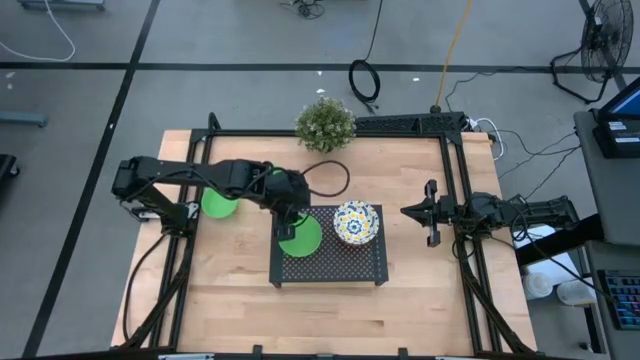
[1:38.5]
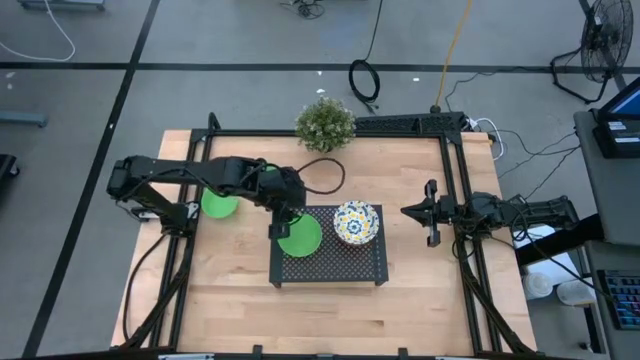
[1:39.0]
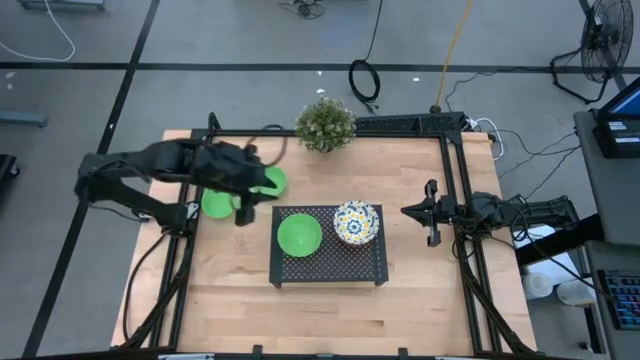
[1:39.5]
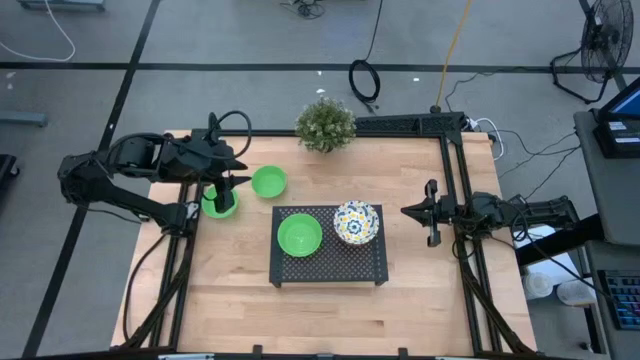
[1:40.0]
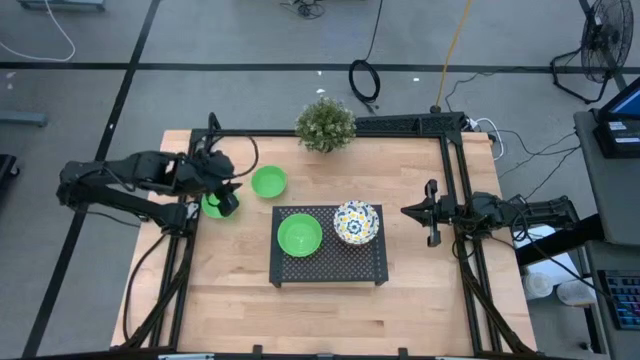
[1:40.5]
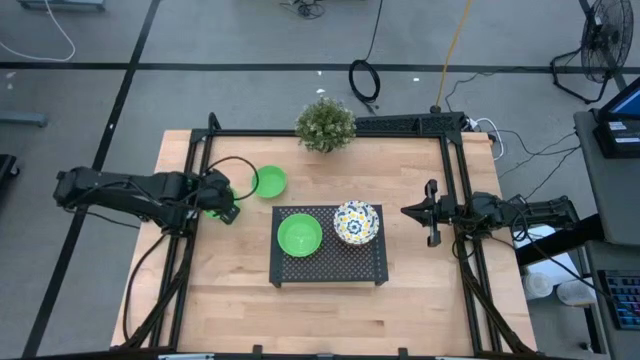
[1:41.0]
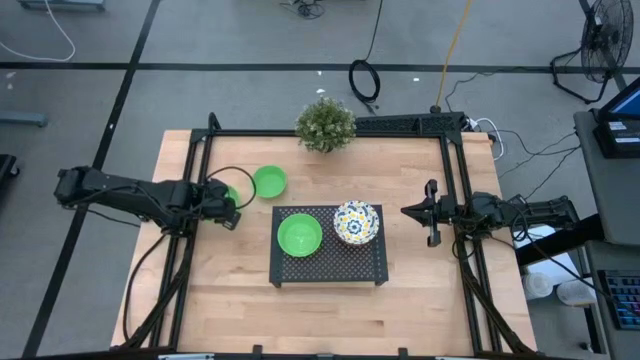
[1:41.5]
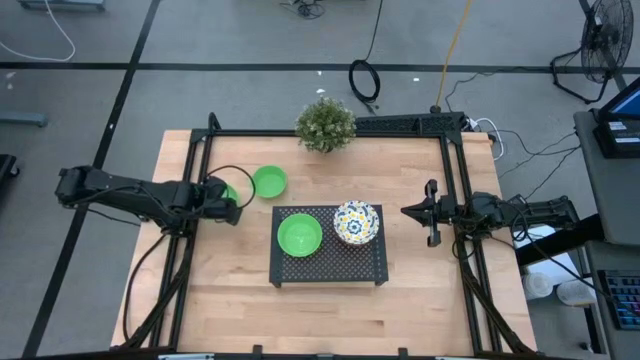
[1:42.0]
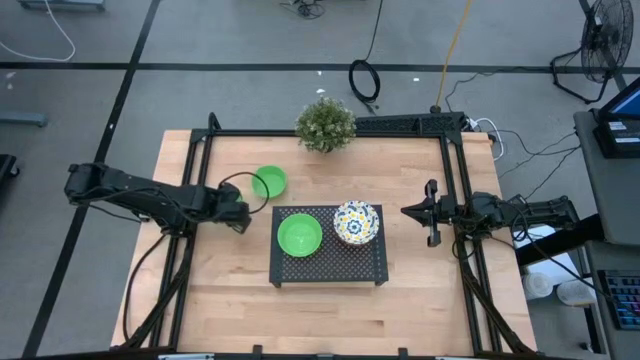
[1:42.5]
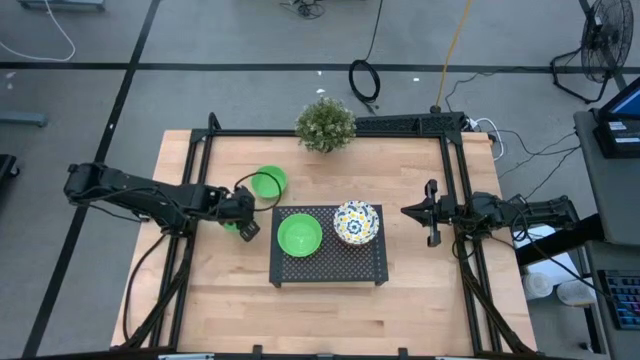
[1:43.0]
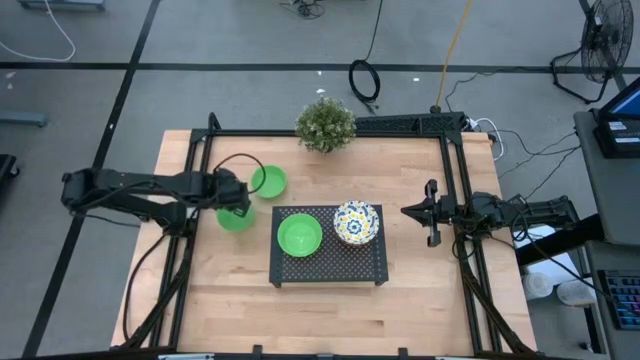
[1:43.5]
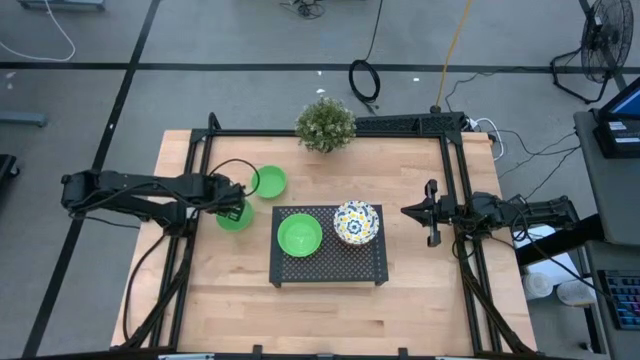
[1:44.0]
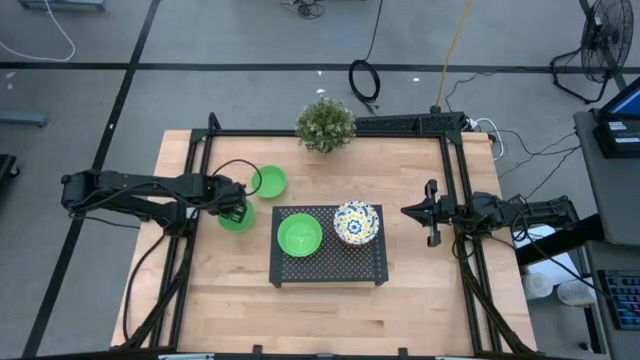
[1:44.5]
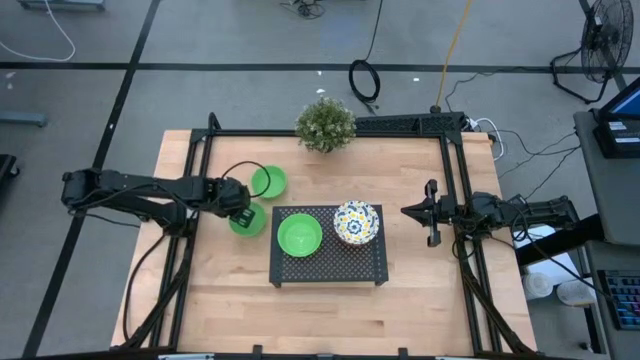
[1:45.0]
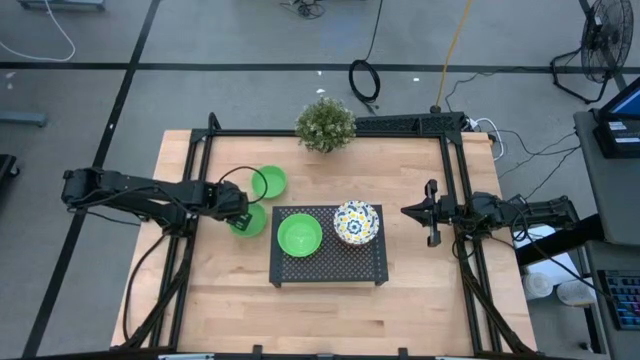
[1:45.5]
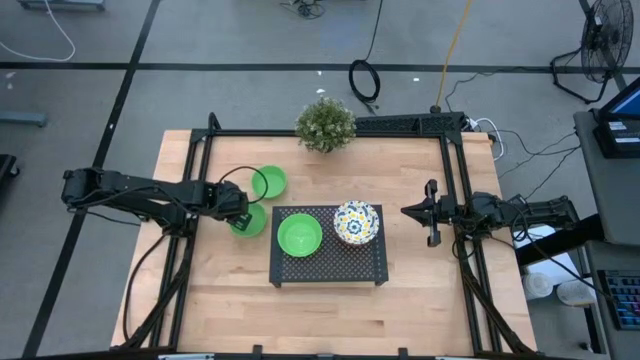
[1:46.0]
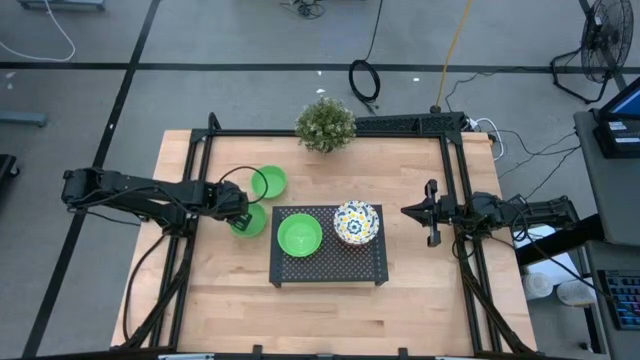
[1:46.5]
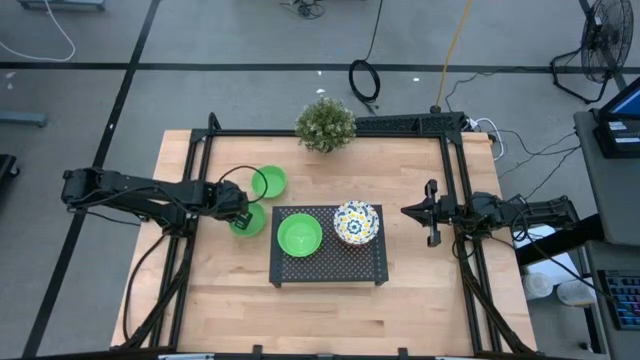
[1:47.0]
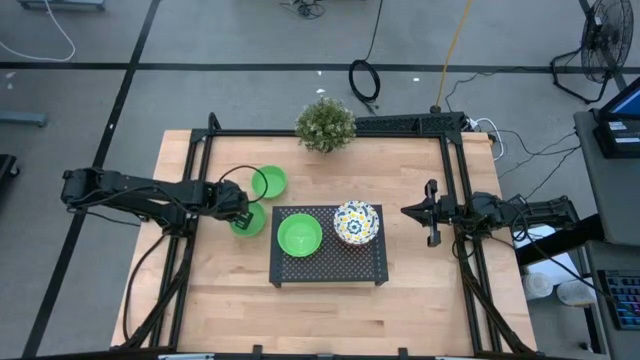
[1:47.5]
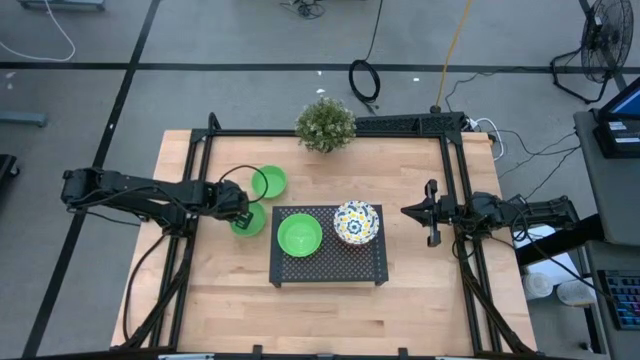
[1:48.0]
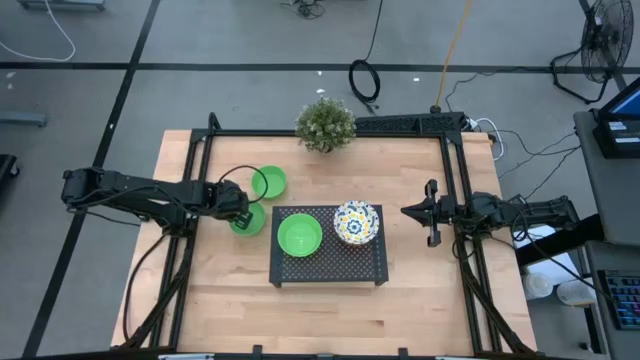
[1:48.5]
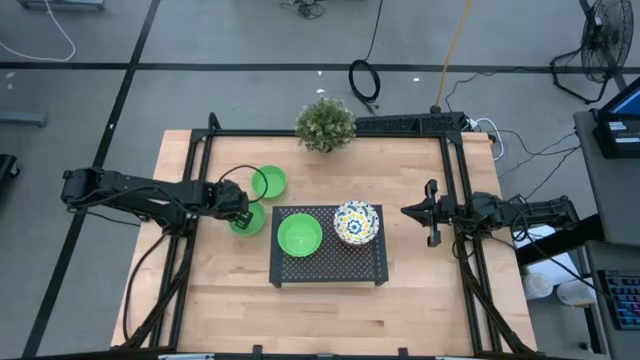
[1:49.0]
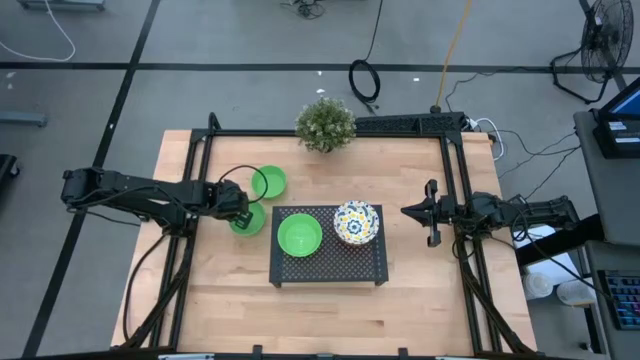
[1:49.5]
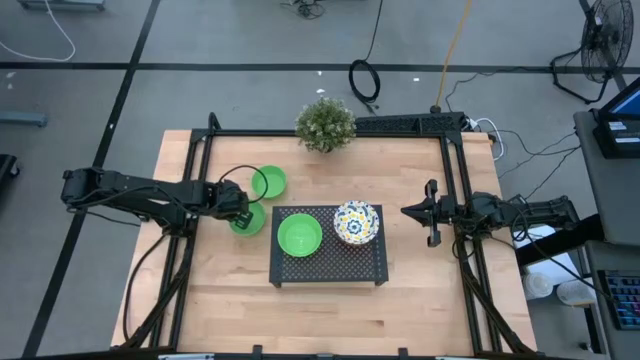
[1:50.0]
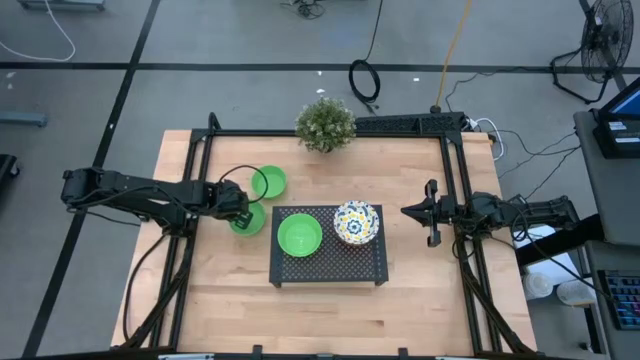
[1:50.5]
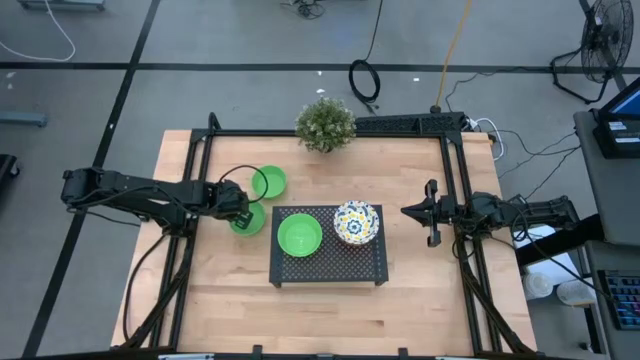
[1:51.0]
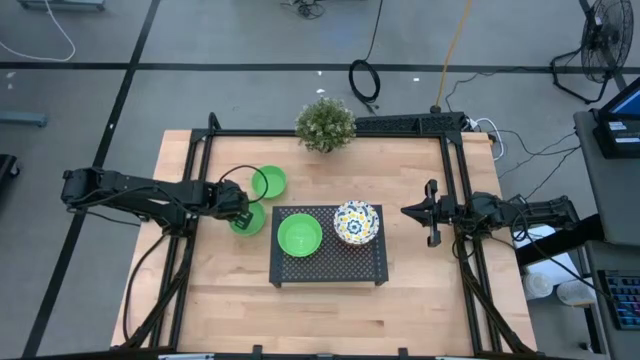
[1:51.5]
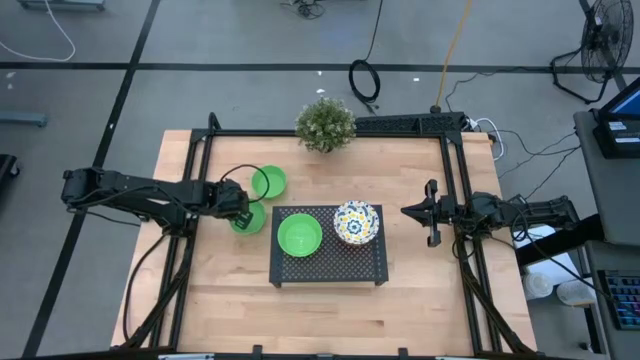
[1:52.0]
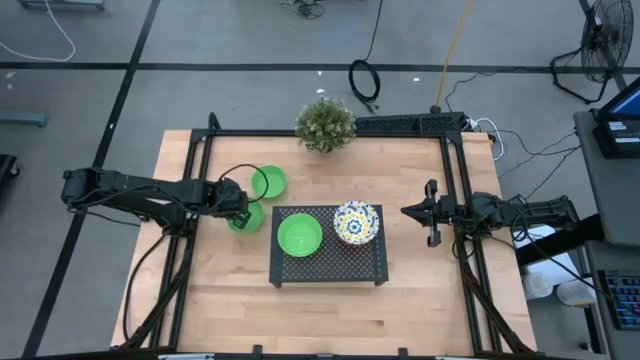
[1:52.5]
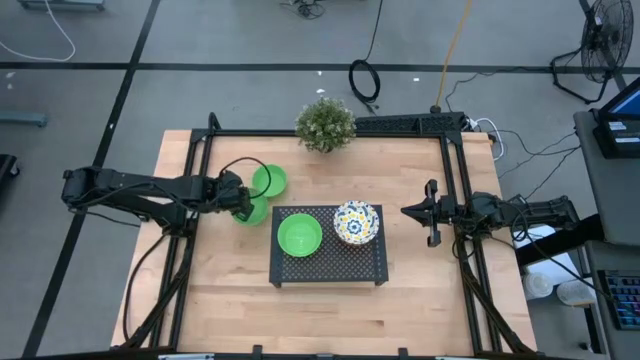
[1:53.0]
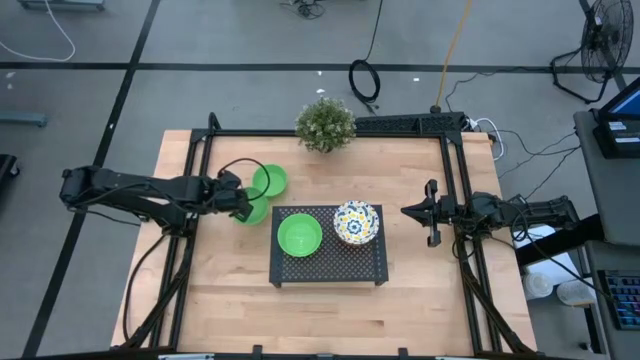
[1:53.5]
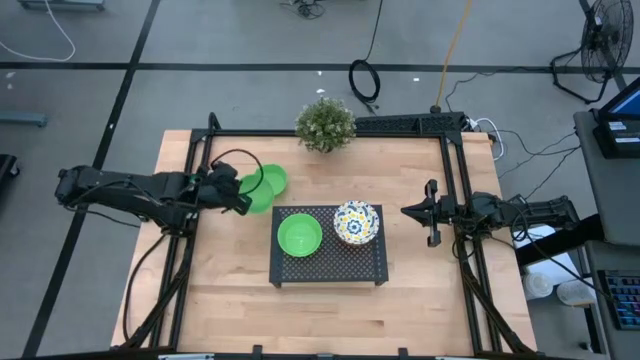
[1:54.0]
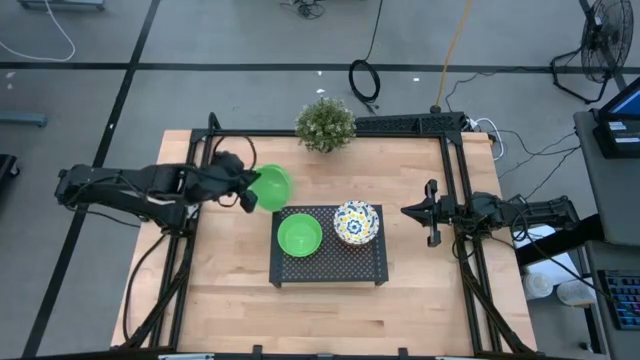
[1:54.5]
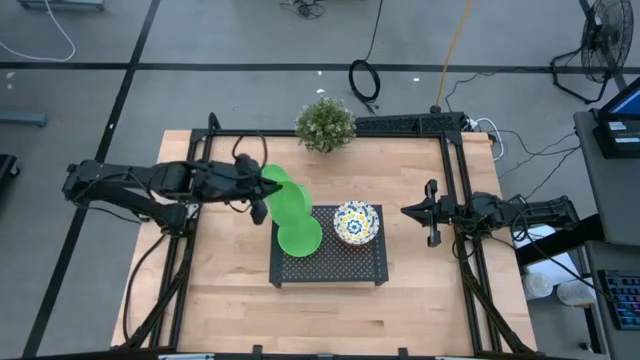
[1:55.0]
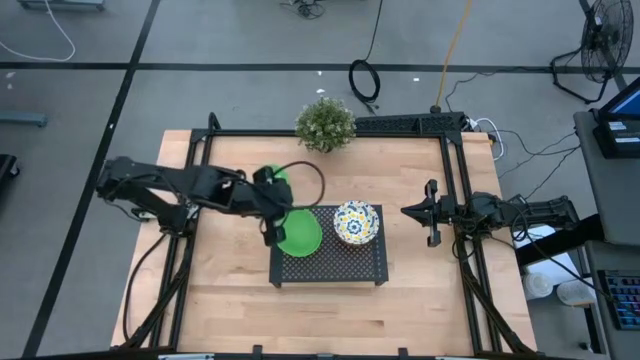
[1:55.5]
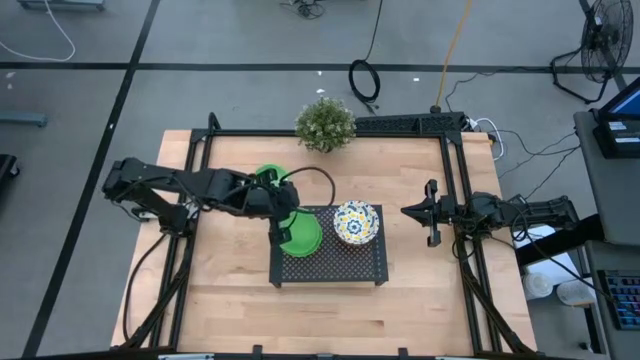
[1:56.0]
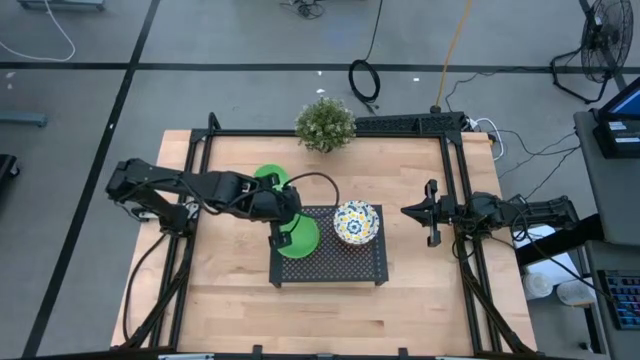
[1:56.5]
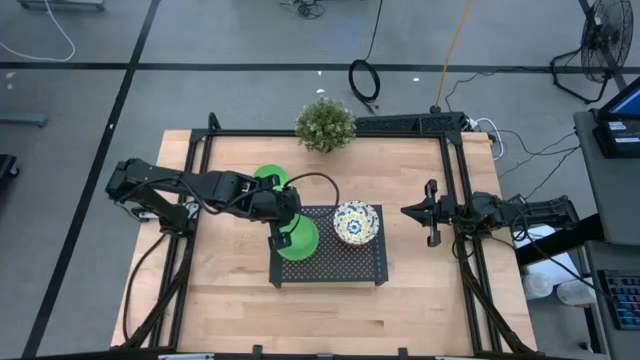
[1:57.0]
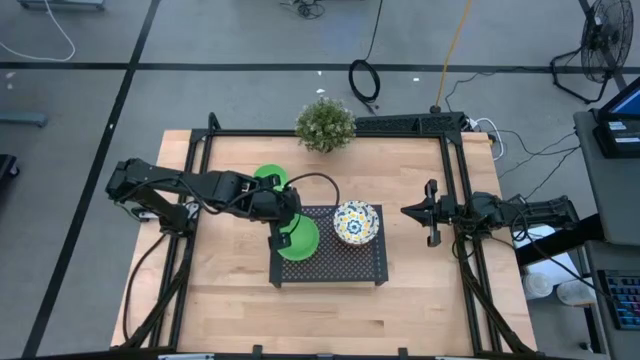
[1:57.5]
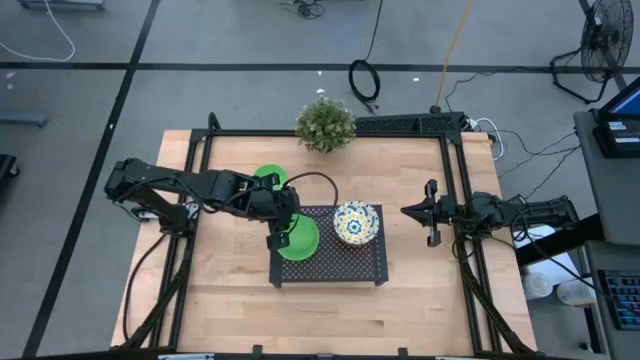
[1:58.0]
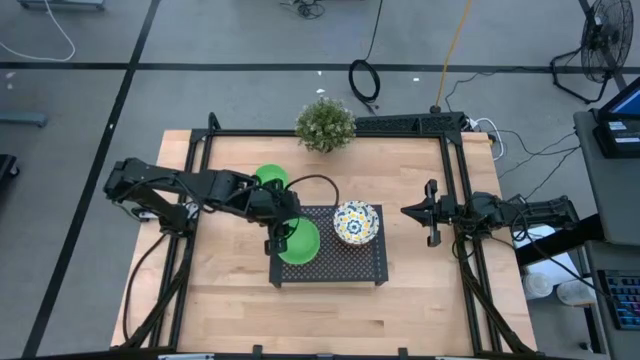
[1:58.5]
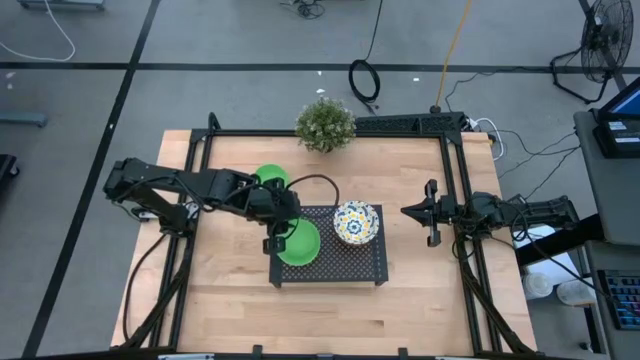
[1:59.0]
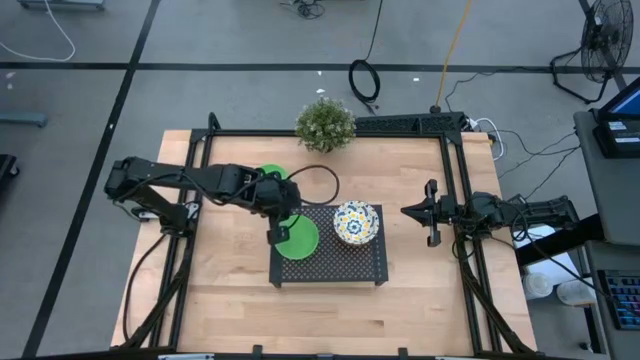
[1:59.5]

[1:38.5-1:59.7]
Task: Pick & Place Mini bowls
Stack the left green bowl on top of the green bowl on the shelf
